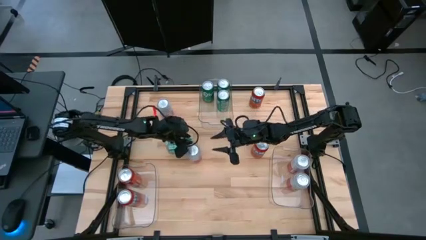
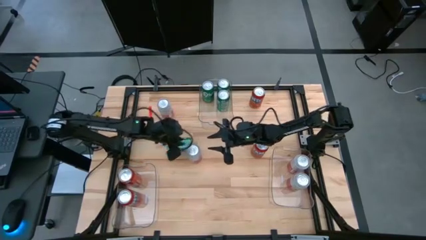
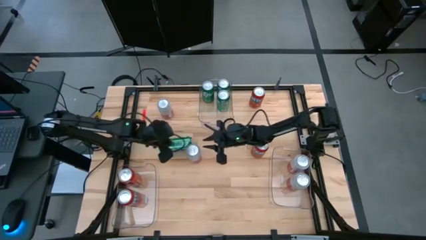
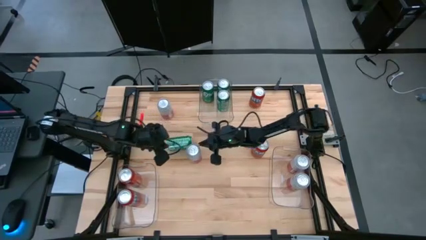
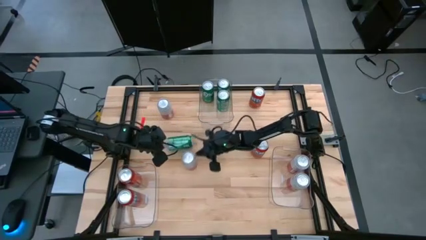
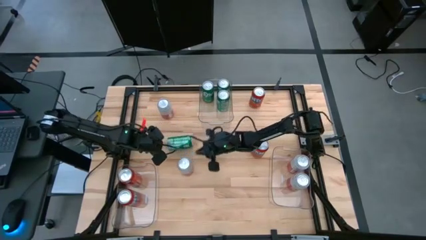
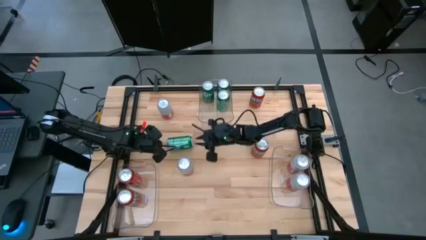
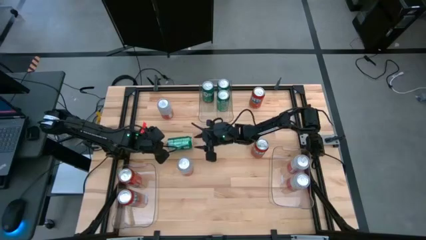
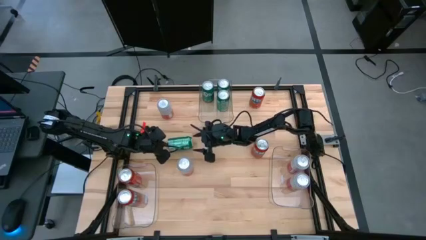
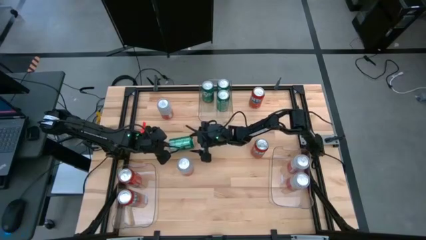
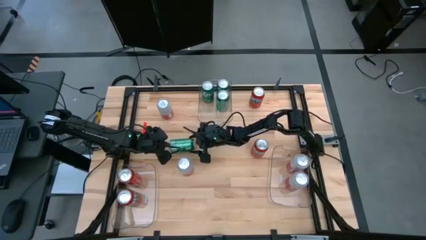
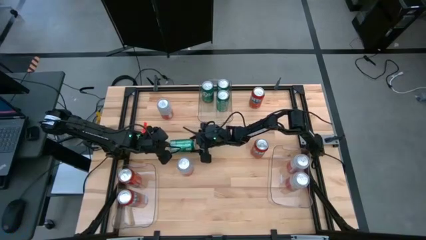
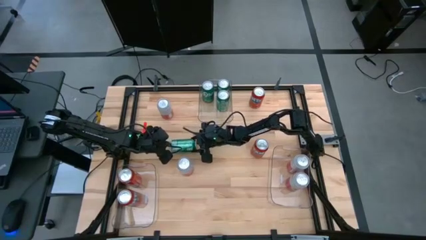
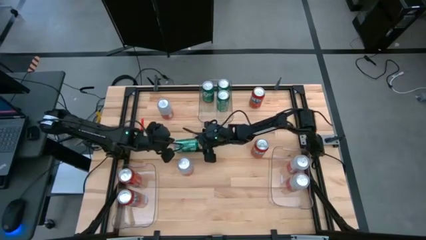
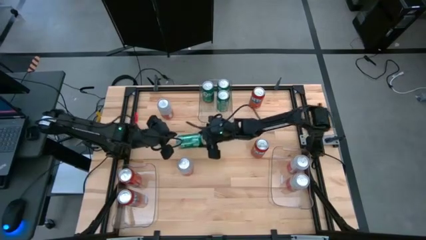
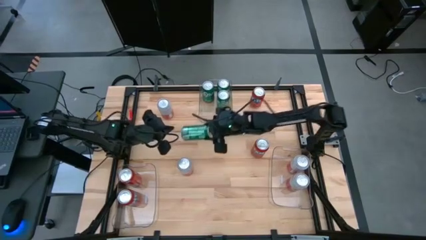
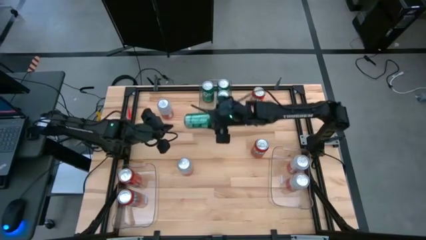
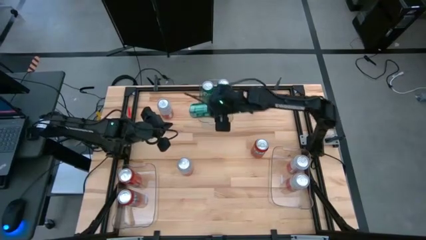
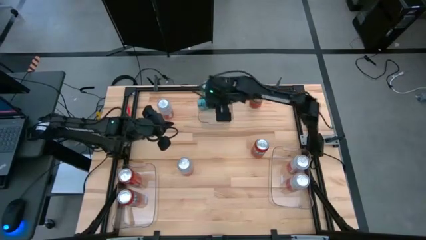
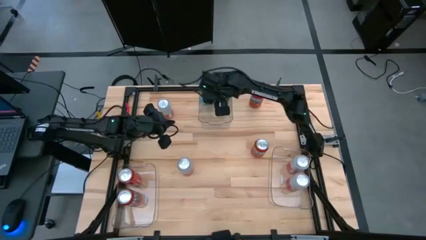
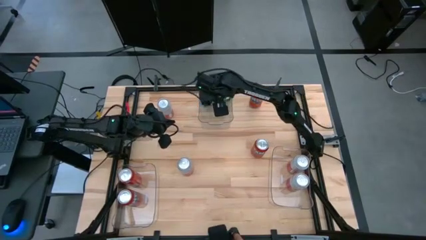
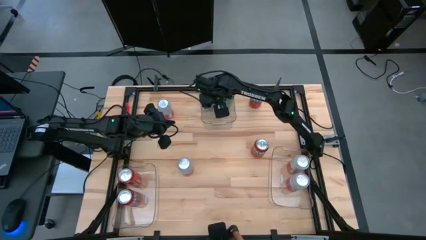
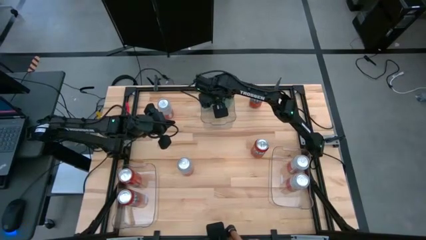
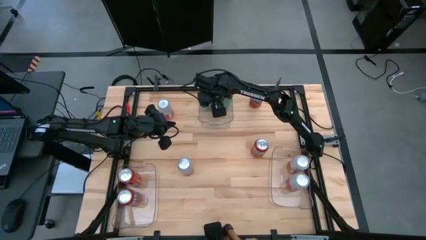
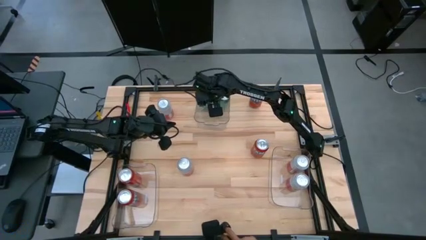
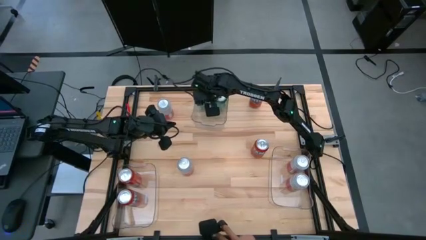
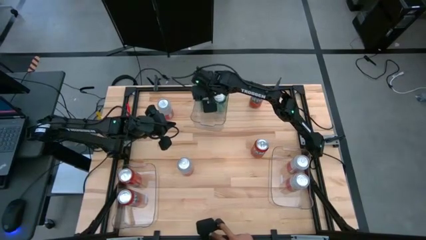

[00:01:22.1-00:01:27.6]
Task: Sort soda cans
Put the green soda can into the top transparent bin

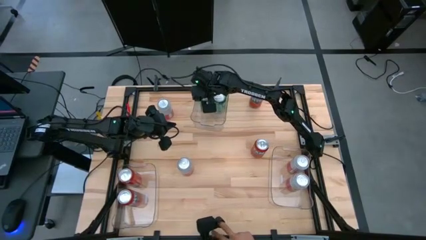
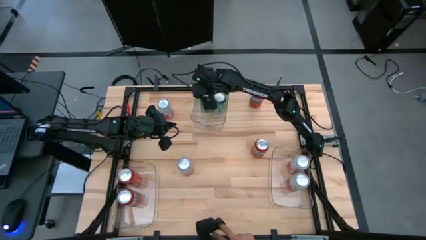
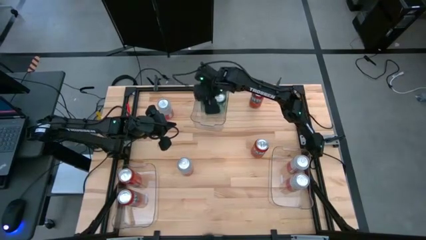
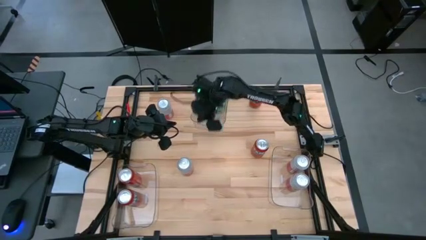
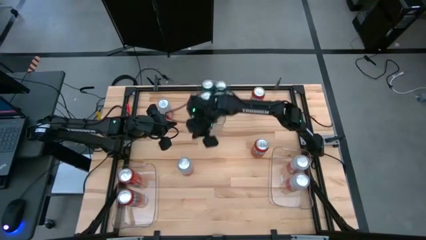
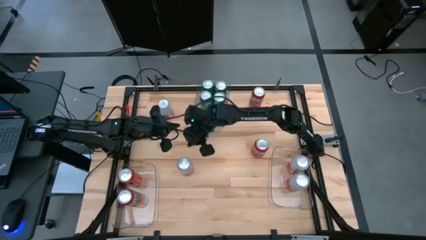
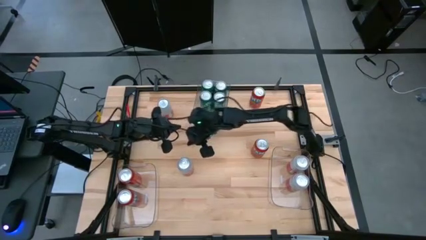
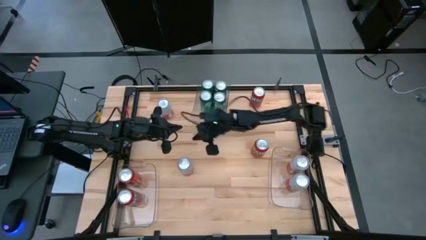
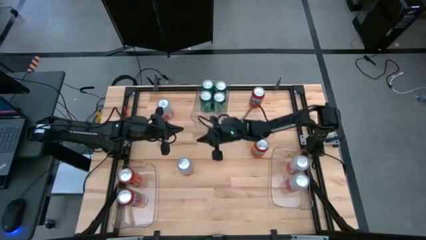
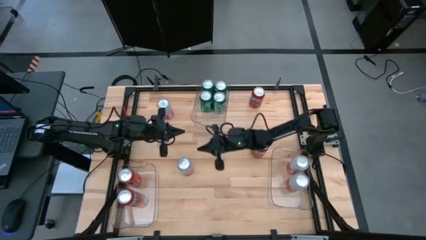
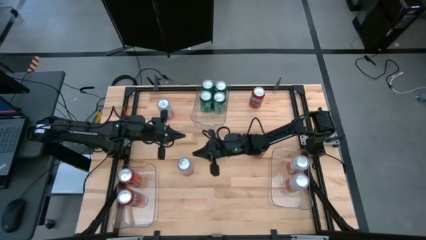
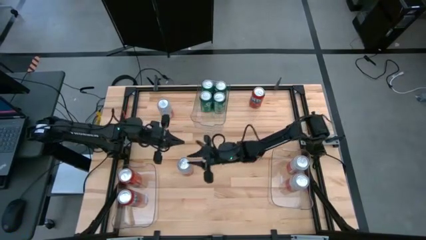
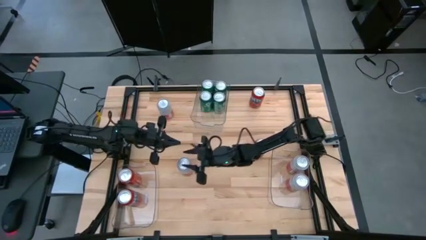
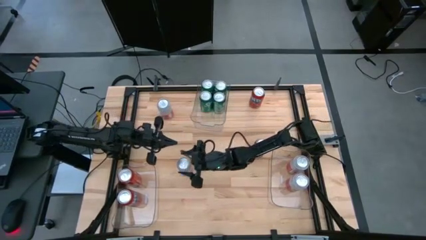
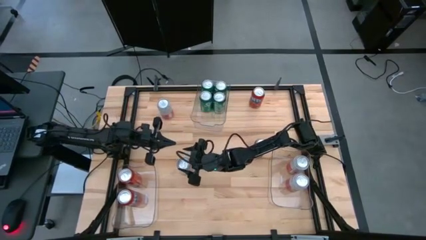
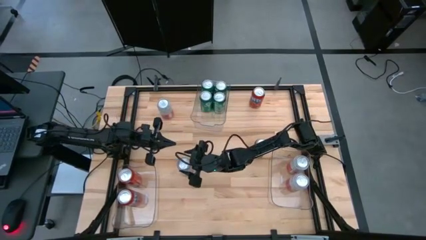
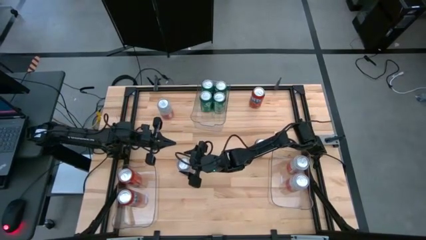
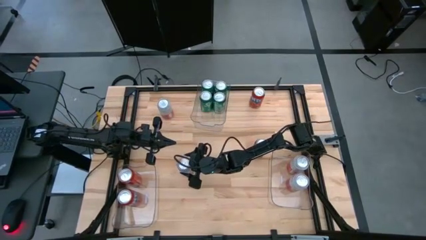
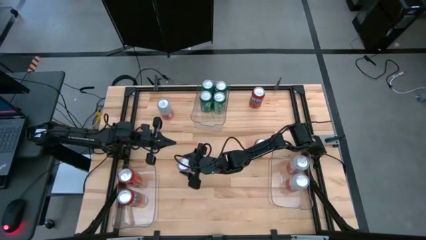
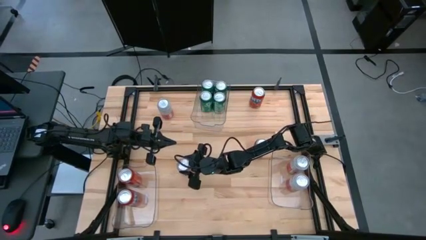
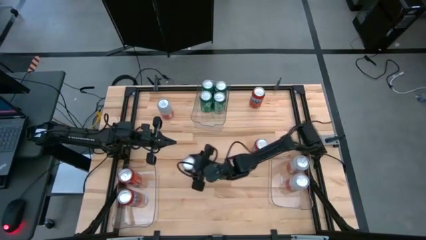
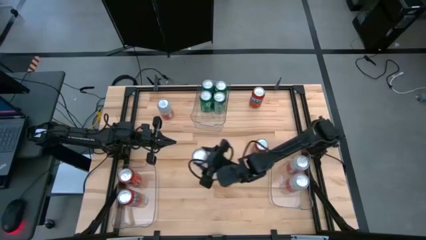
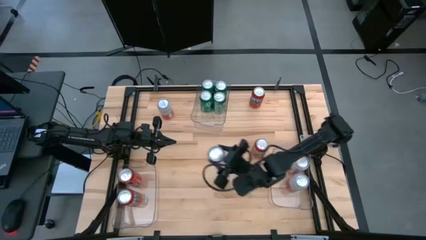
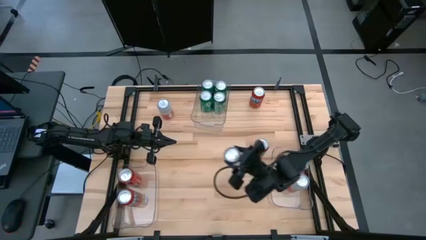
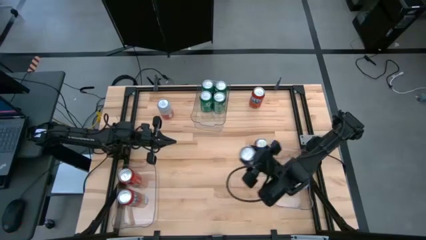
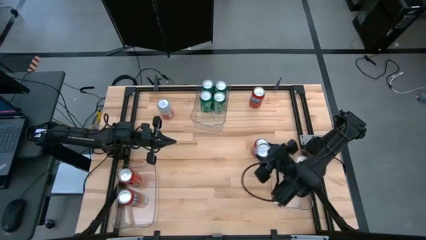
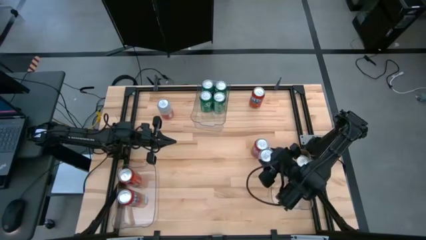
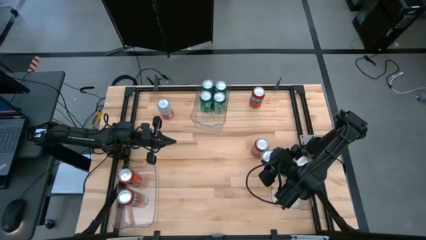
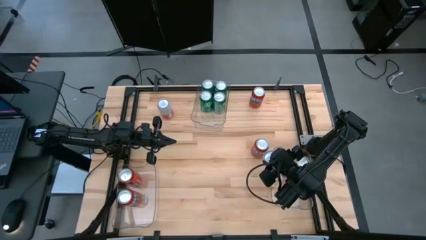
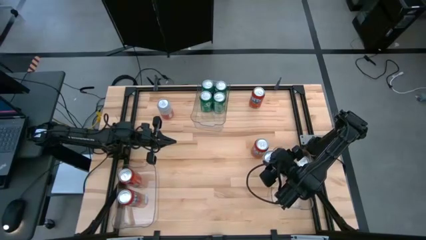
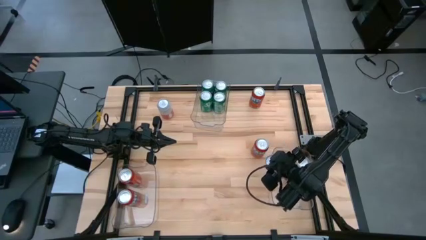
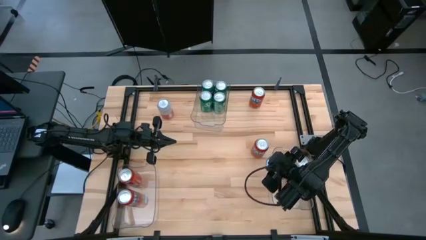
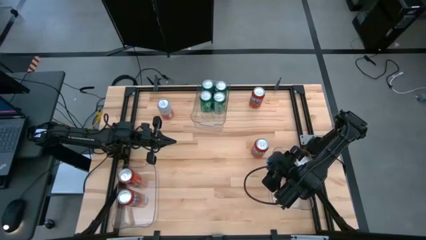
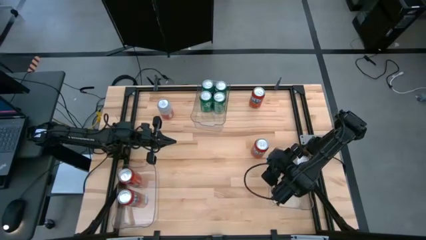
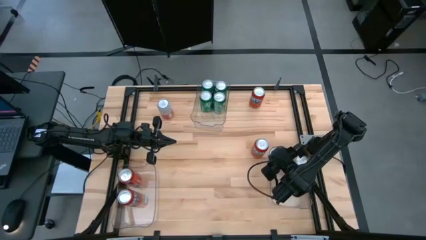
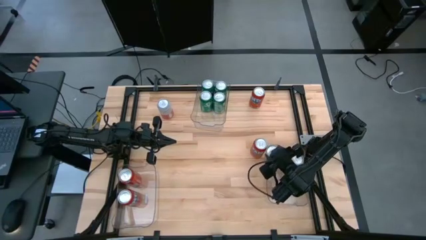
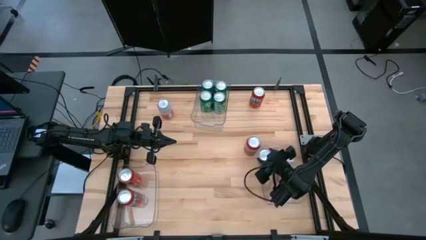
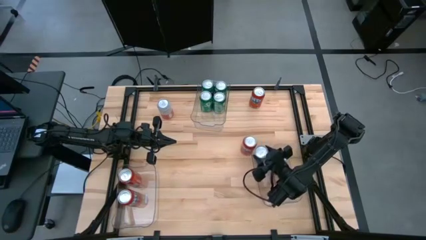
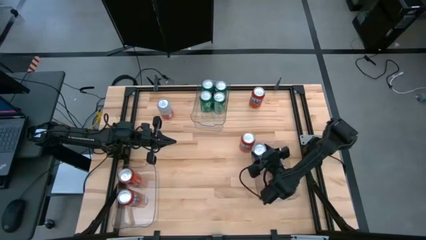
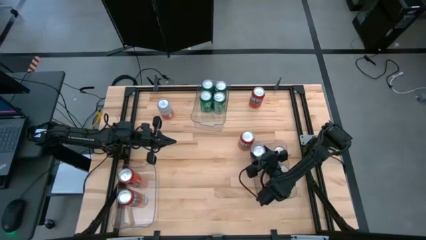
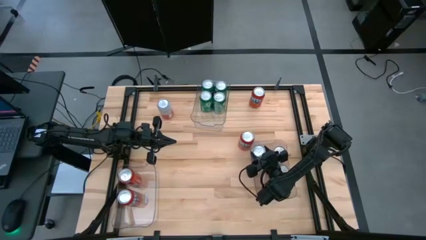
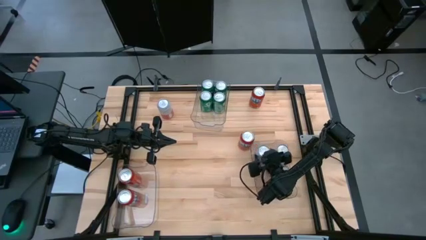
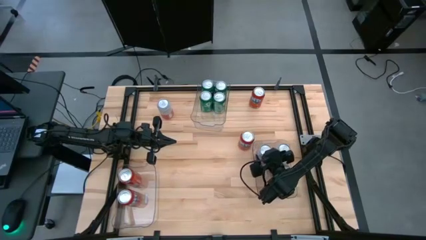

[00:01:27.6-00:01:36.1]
Put the bottom pink and white soda can into the bottom right transparent bin

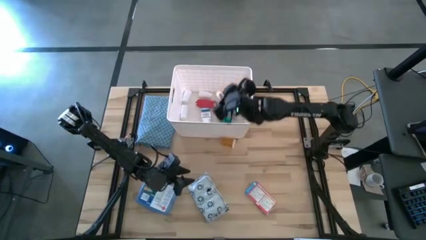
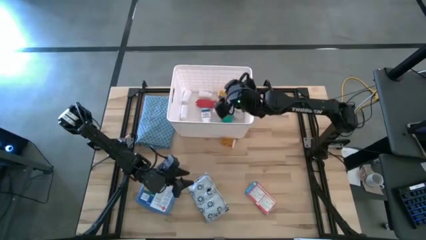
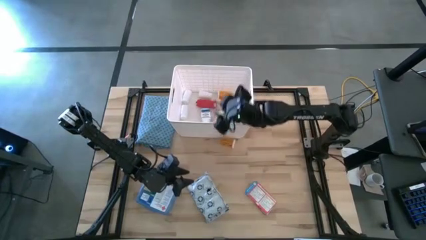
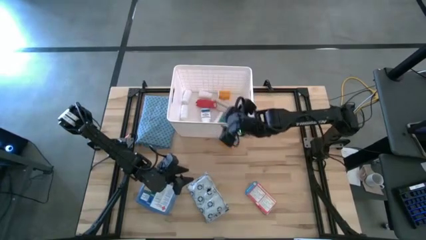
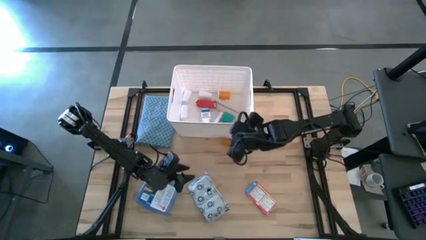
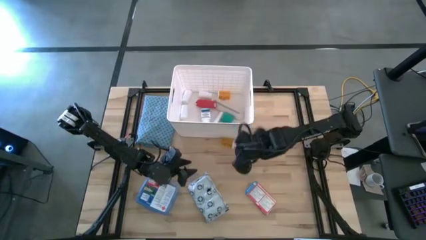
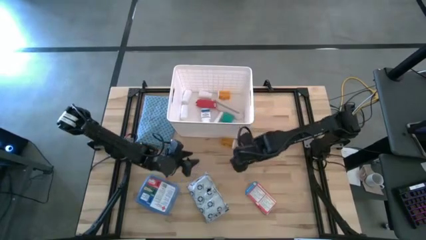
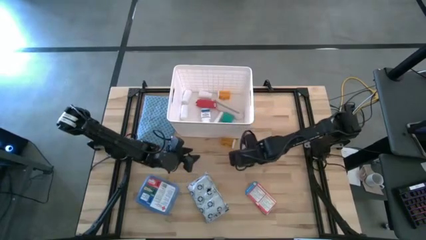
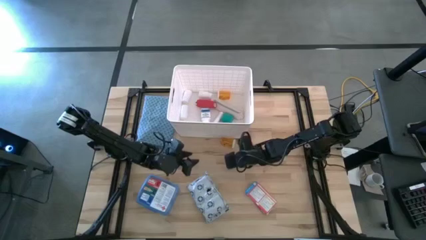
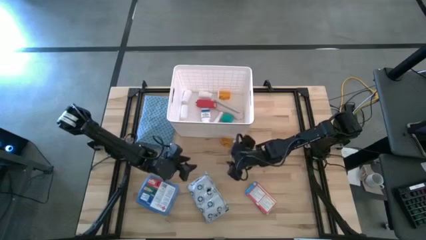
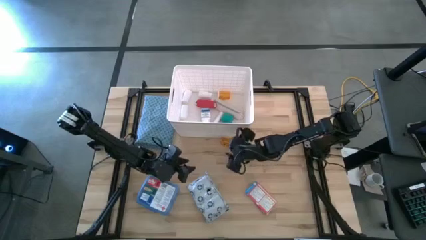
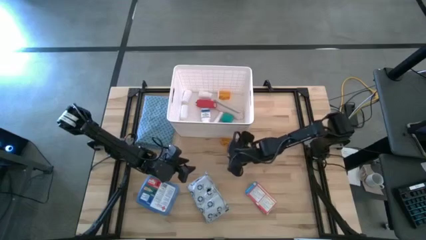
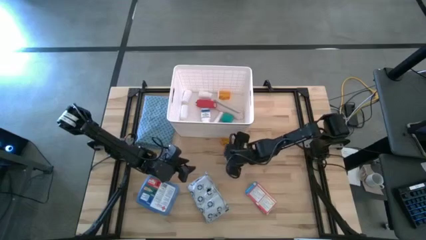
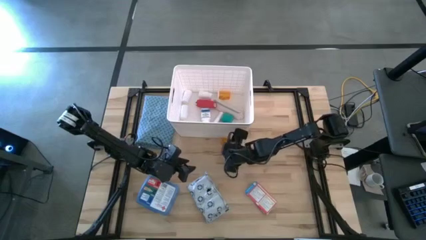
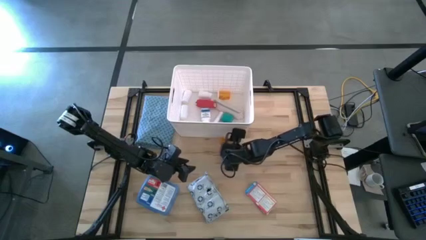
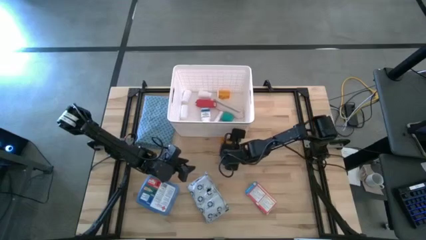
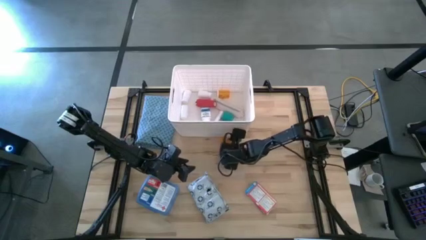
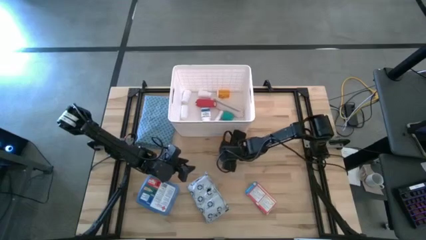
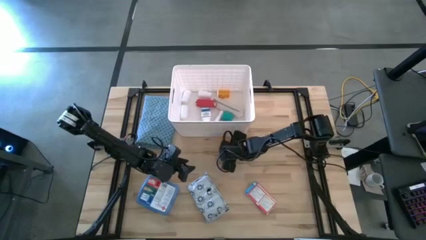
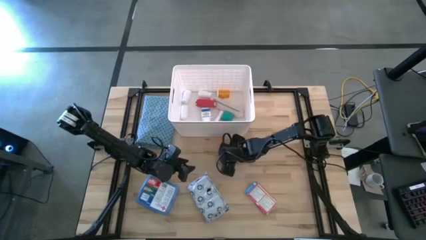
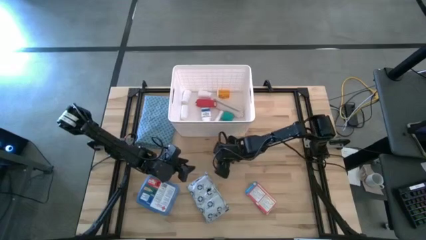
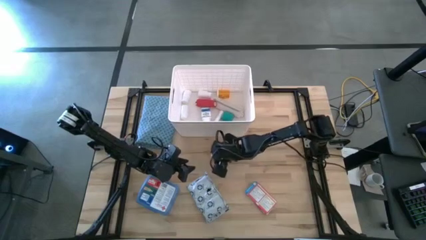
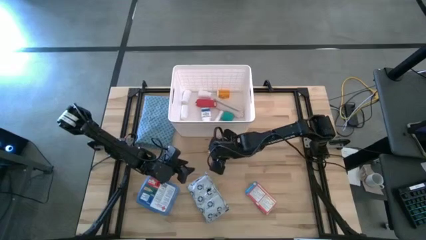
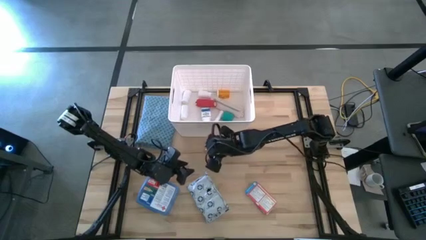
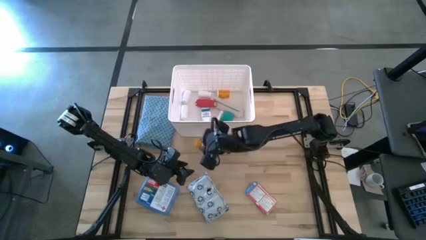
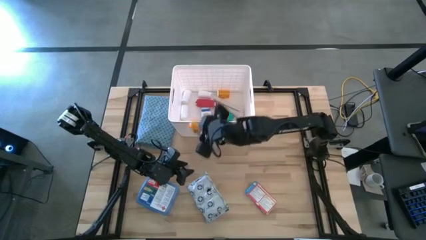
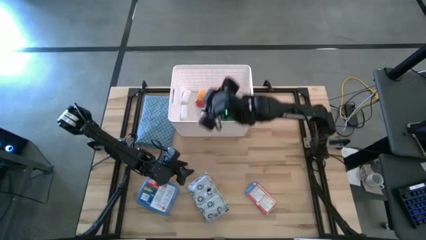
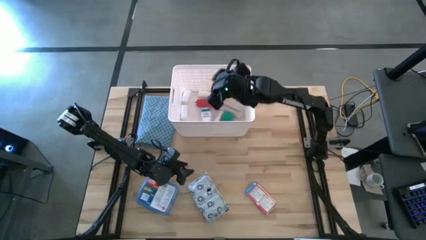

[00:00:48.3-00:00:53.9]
Task: Pick & place medical supplies in basket/bin
Put the orange pill bottle in the white bin
